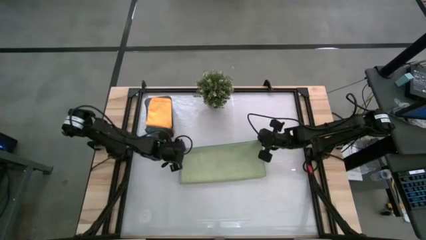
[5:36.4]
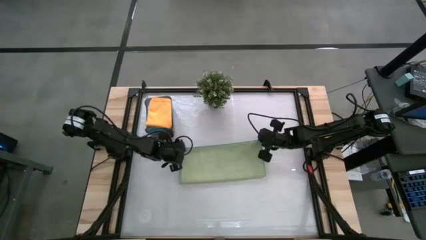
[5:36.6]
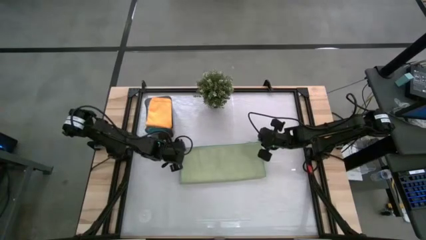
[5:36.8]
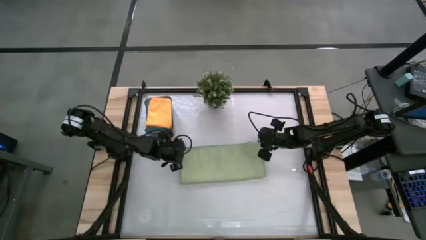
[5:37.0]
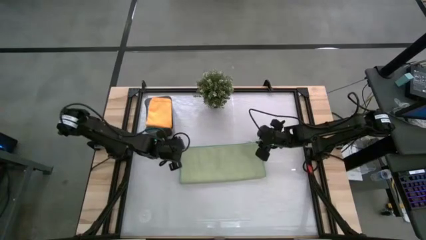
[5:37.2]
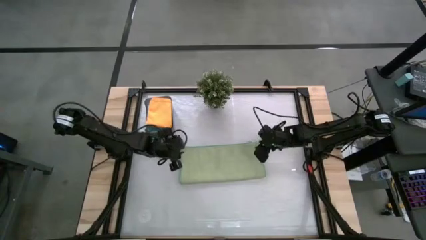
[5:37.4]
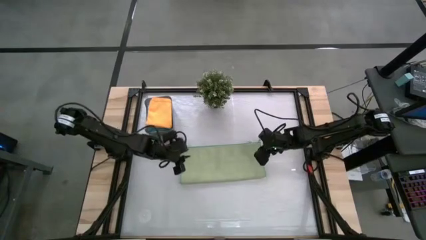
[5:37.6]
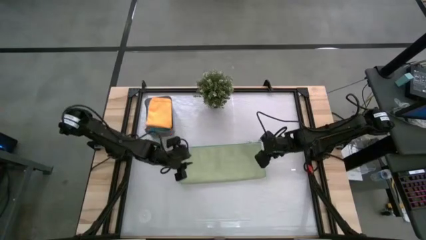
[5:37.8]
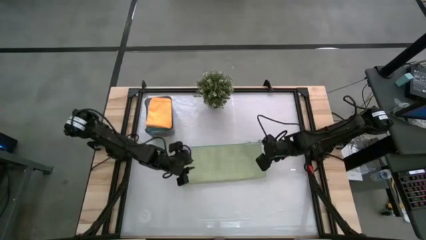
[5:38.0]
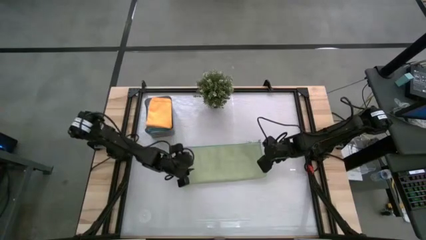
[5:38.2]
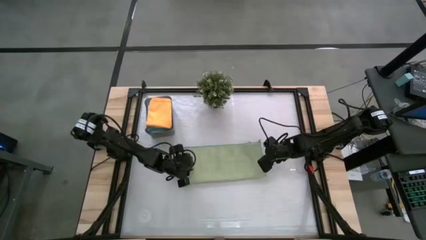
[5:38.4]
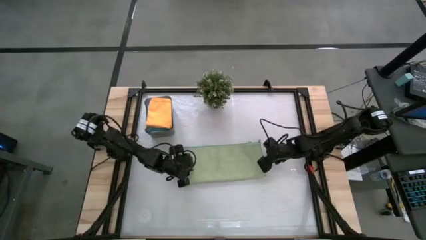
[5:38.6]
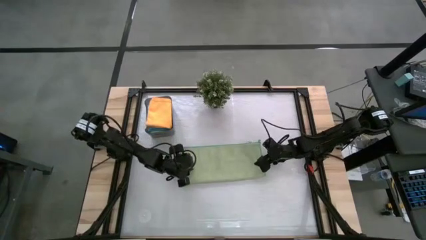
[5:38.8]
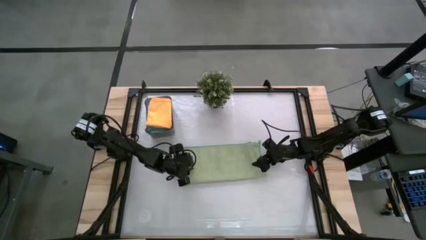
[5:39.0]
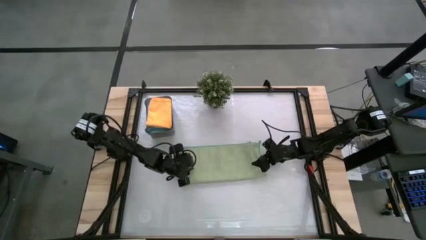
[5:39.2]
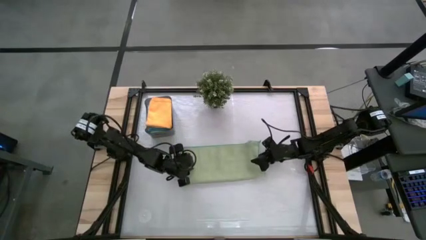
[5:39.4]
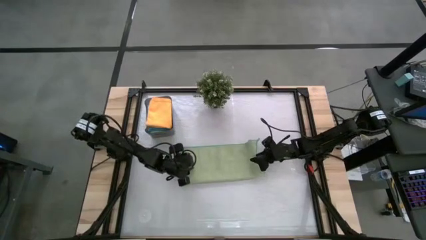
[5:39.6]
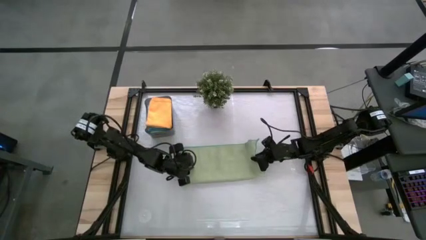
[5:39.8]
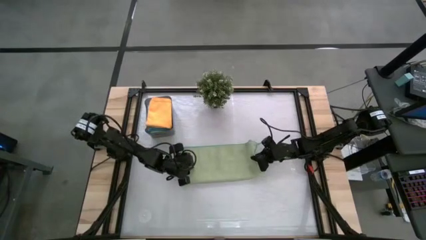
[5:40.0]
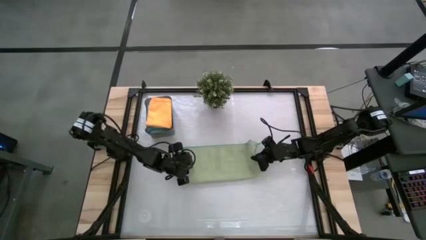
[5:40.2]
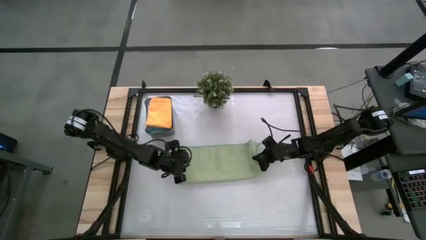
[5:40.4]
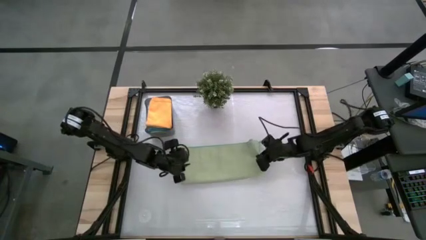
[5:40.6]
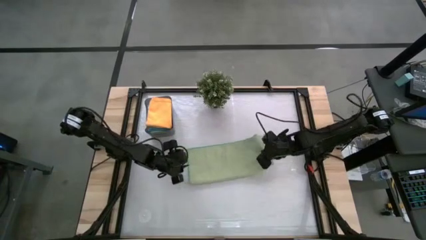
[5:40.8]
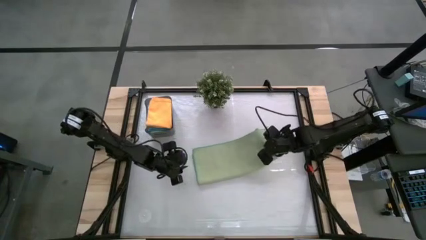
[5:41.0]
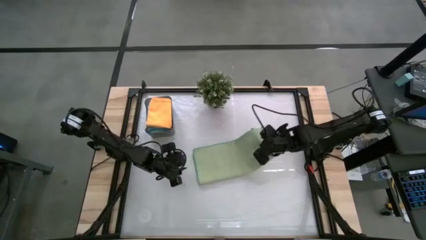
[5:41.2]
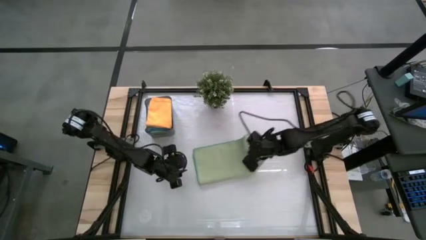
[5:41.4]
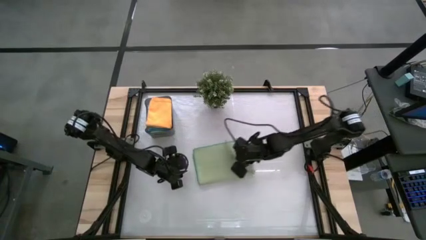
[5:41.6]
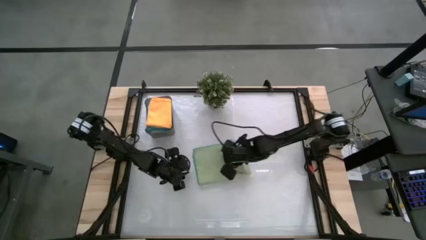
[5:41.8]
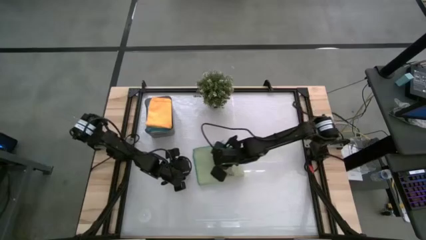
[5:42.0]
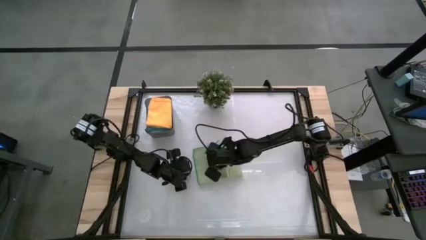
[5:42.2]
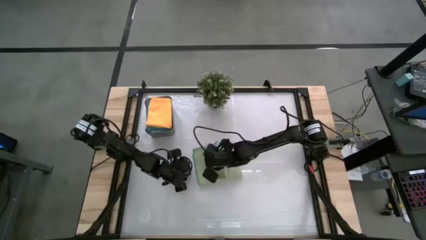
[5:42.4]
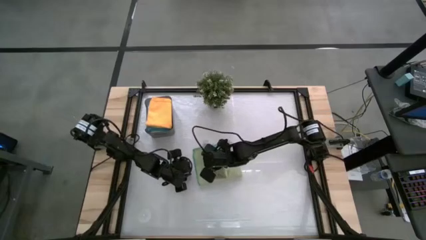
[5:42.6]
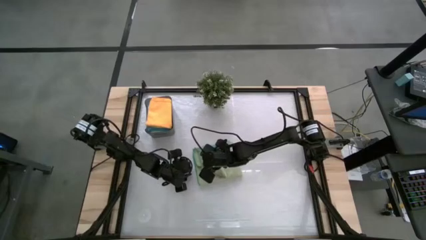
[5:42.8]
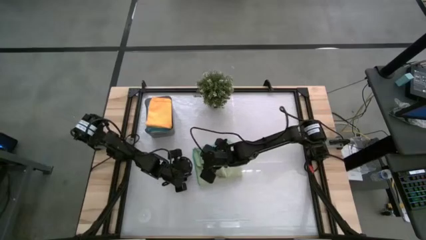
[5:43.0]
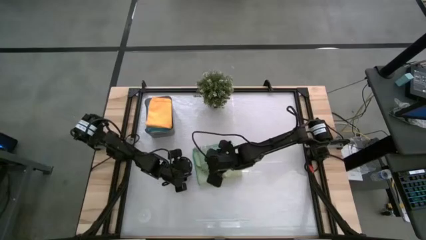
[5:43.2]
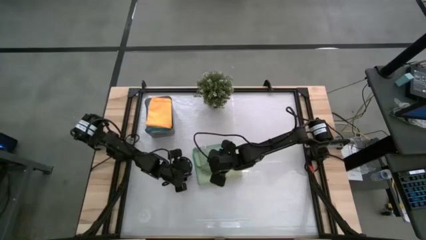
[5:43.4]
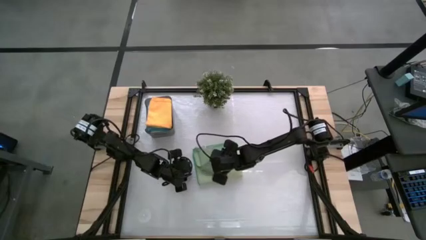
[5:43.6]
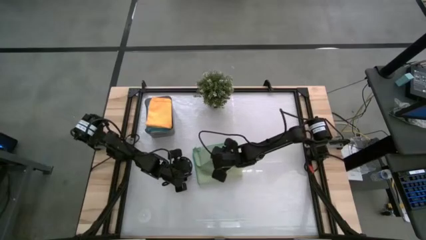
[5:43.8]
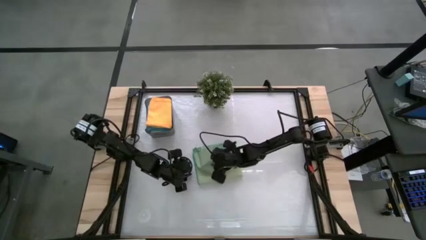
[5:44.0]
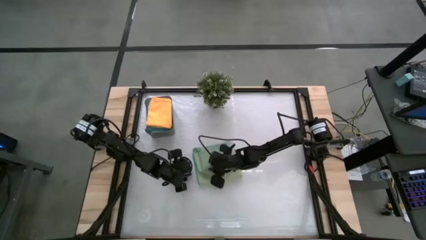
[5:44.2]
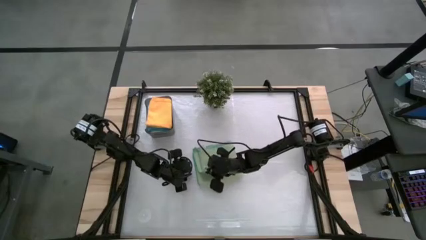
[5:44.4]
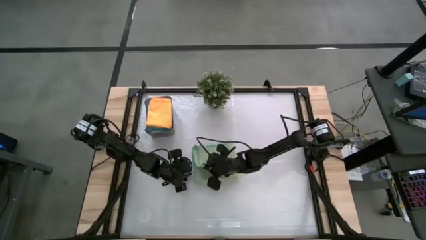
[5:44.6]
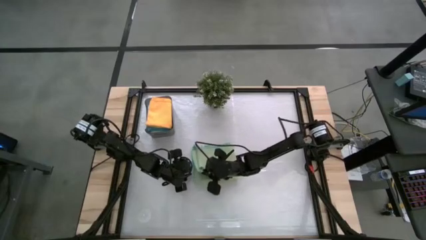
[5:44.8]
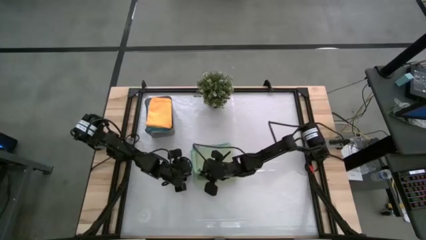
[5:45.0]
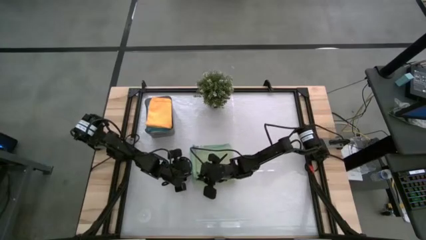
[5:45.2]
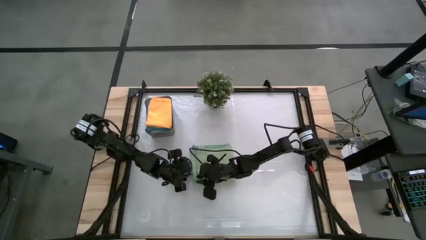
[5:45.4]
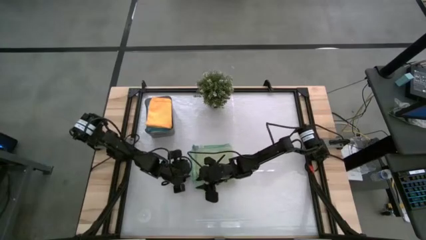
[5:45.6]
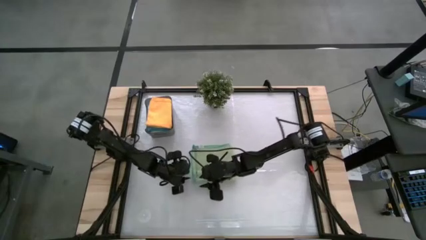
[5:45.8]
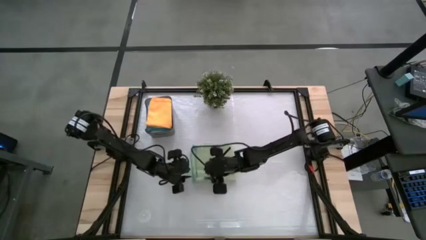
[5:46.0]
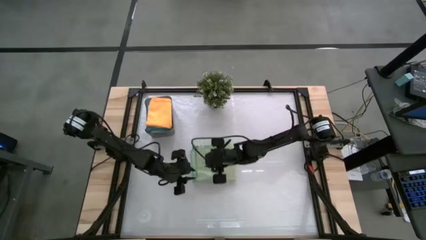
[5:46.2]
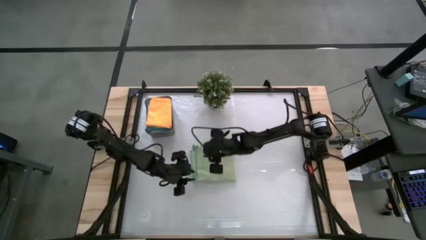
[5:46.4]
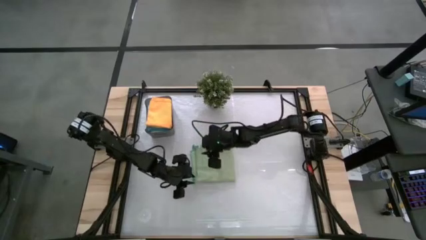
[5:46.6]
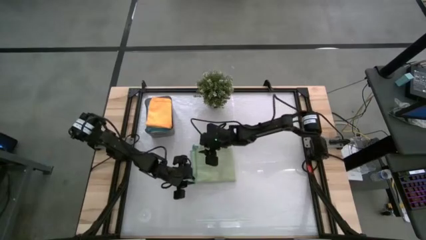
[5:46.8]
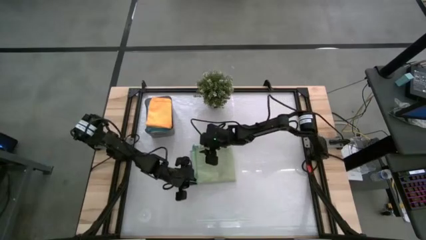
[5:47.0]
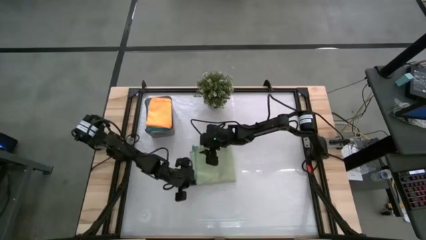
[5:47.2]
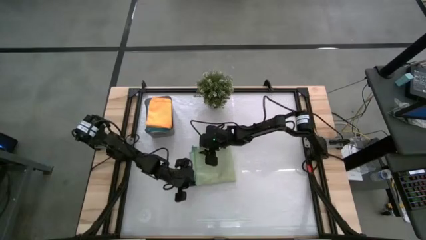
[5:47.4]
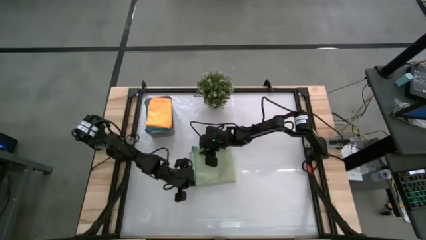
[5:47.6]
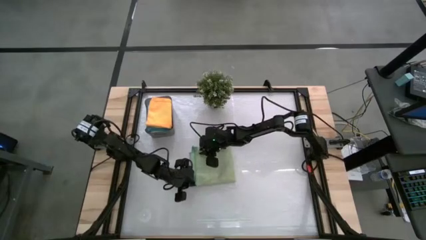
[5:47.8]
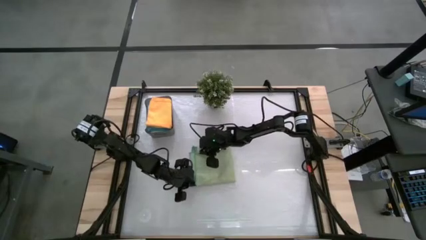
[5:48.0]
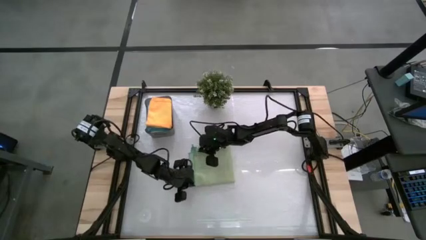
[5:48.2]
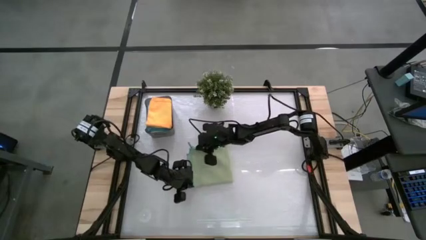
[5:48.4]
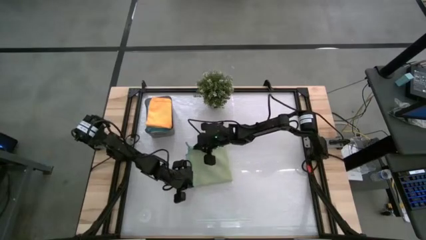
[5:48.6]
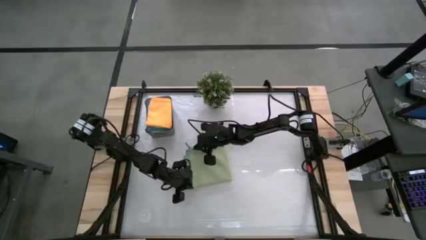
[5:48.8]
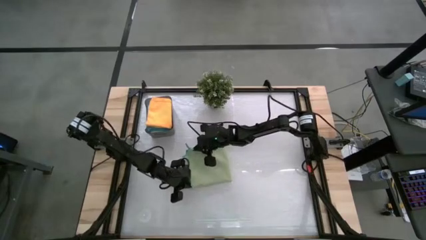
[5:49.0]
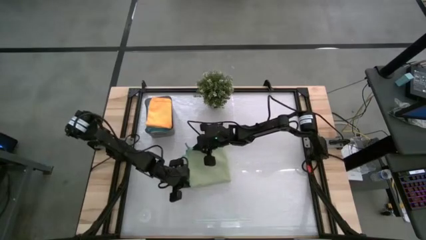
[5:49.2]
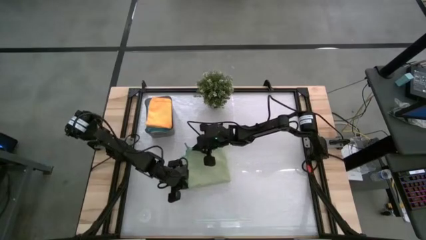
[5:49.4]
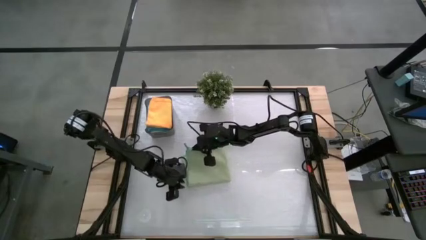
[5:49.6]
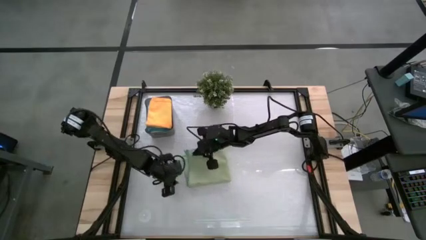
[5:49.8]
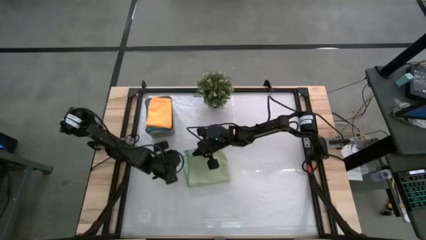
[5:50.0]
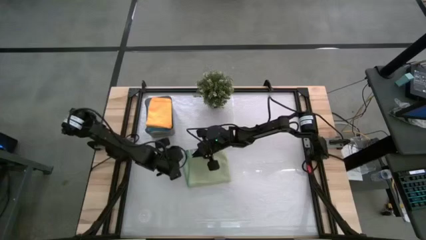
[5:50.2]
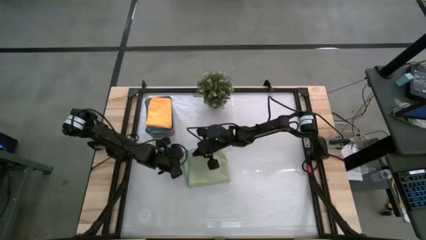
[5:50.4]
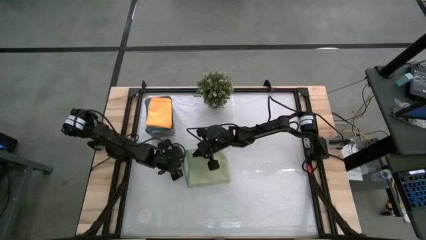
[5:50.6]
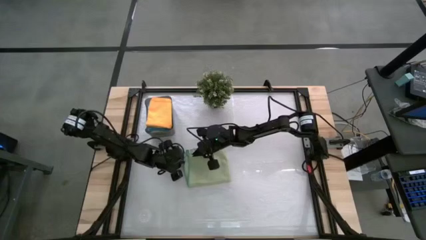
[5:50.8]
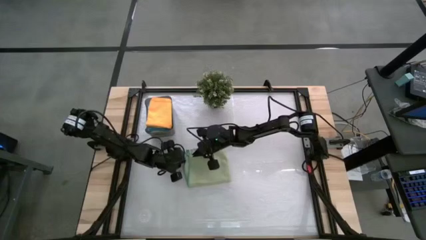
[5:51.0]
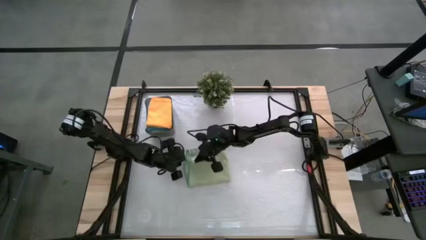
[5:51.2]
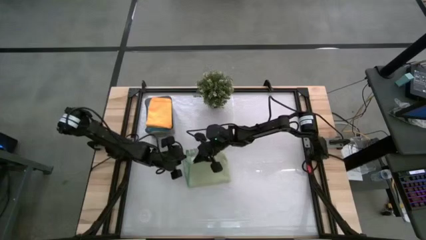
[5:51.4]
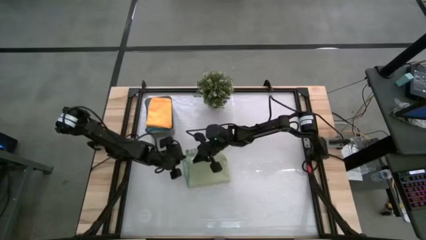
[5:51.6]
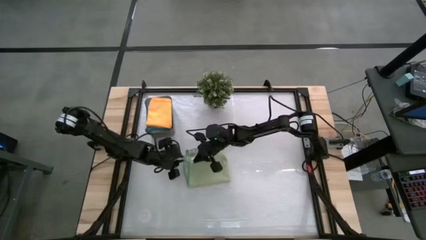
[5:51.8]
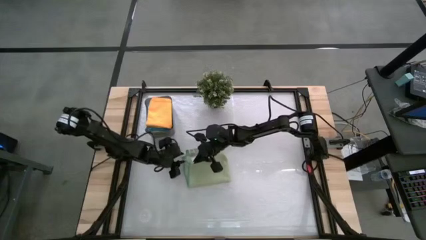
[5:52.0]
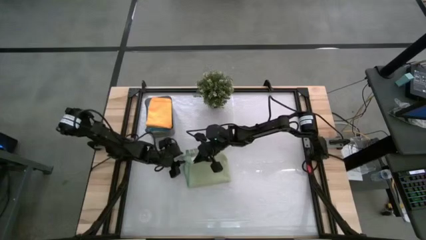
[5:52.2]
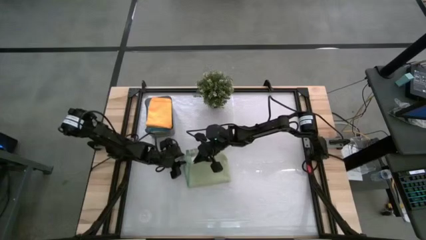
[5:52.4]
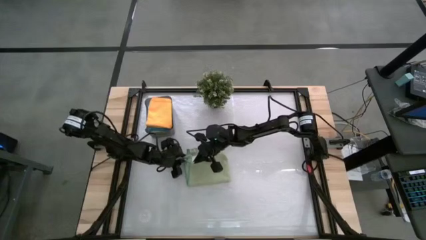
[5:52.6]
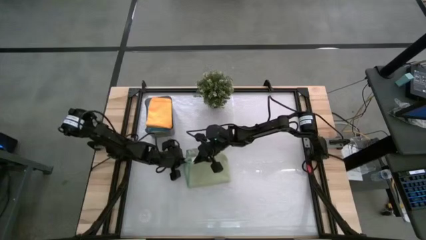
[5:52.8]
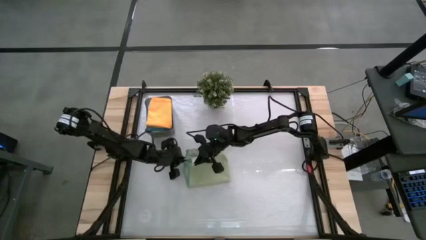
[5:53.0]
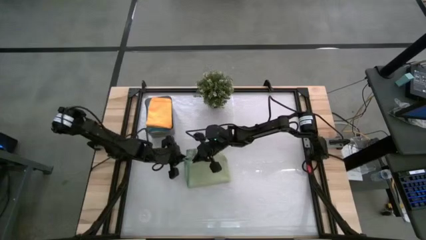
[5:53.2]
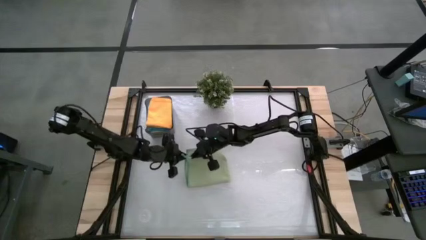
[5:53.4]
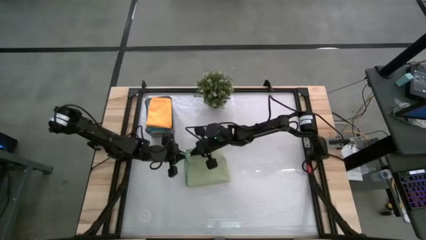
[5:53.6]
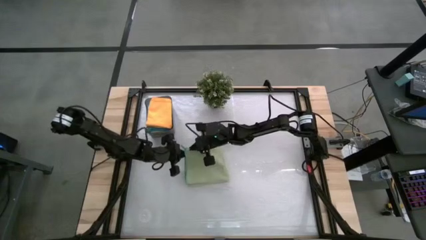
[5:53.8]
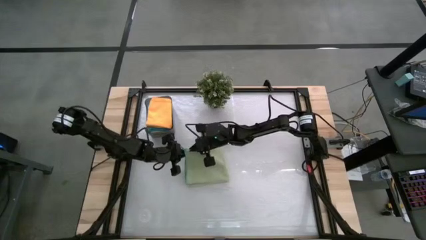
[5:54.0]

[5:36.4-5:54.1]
Task: Fold microfiber towels
Fold the green microfiber cloth
